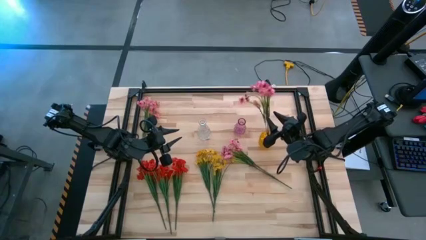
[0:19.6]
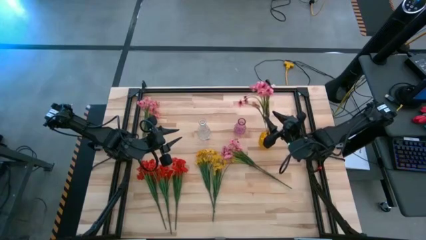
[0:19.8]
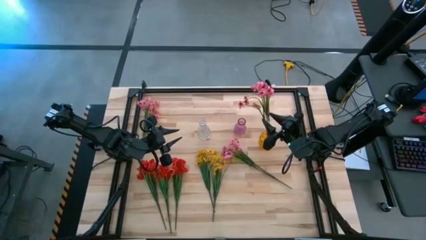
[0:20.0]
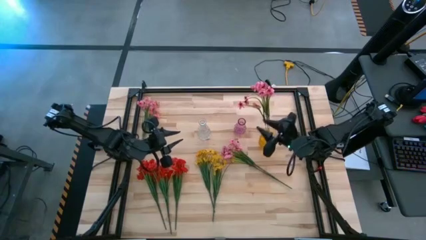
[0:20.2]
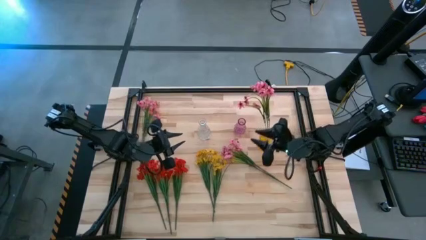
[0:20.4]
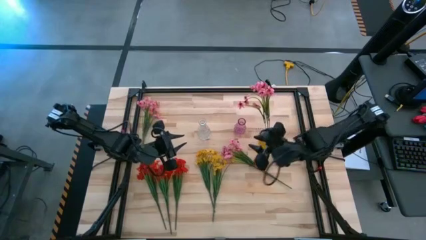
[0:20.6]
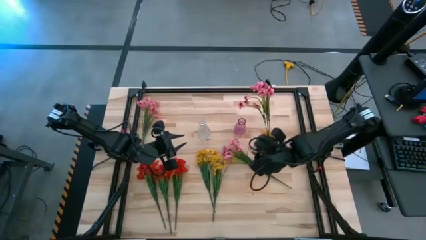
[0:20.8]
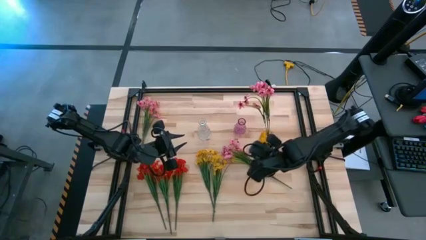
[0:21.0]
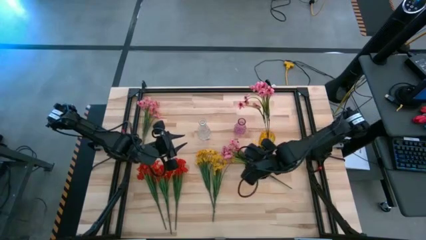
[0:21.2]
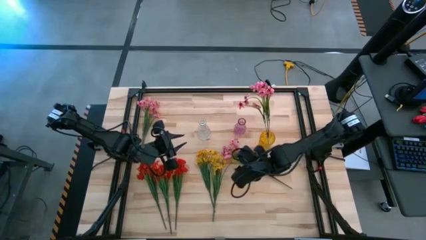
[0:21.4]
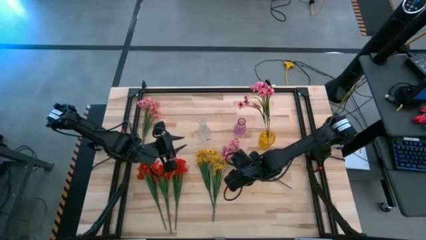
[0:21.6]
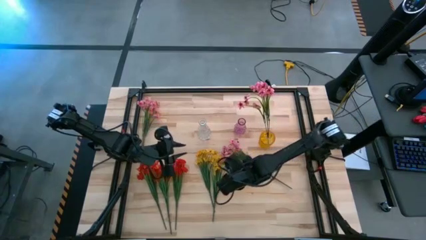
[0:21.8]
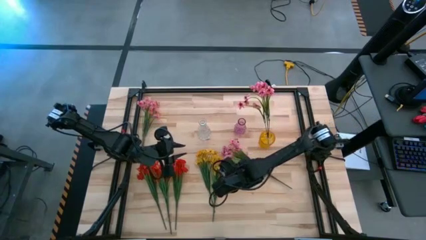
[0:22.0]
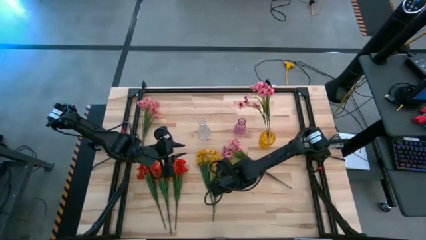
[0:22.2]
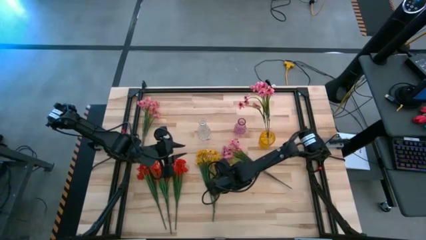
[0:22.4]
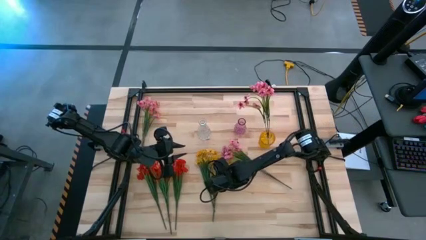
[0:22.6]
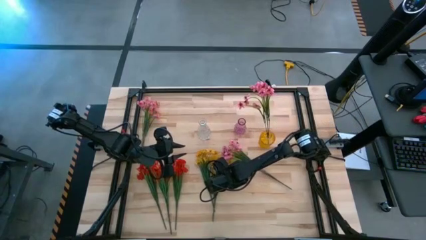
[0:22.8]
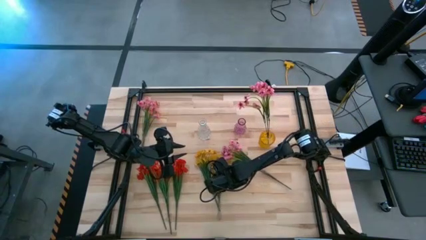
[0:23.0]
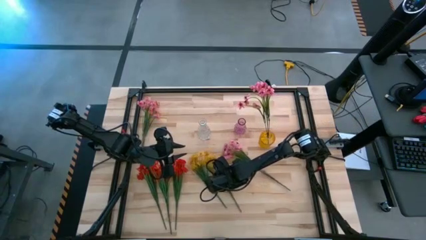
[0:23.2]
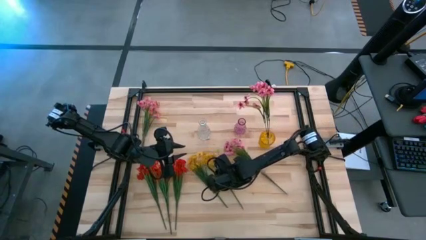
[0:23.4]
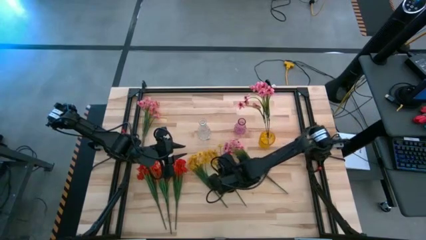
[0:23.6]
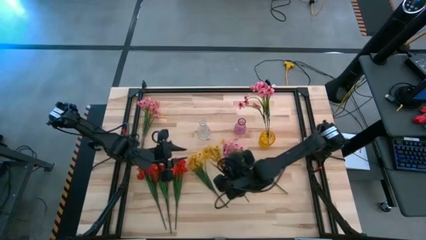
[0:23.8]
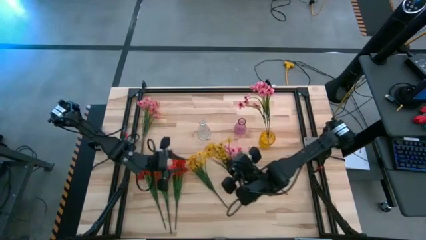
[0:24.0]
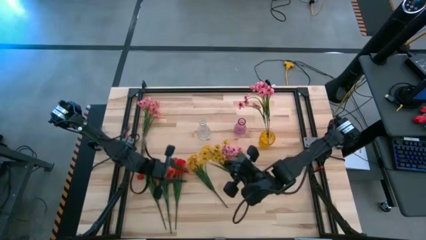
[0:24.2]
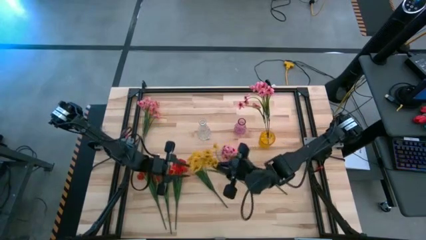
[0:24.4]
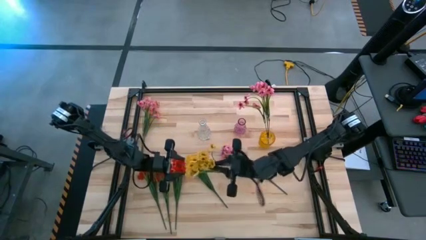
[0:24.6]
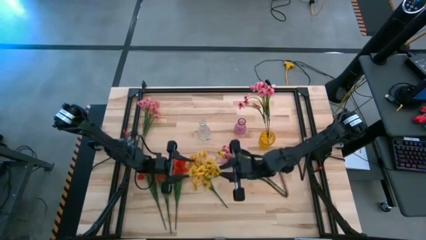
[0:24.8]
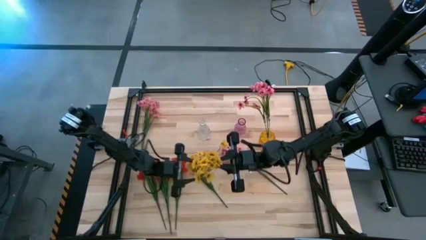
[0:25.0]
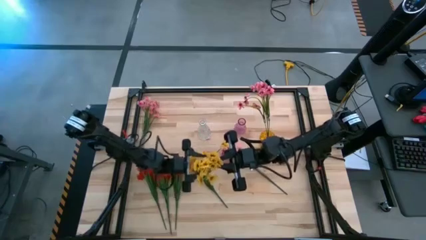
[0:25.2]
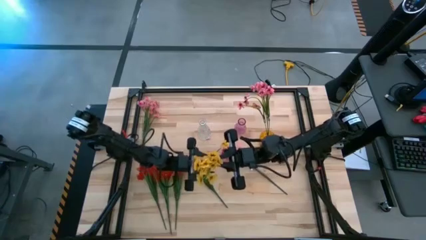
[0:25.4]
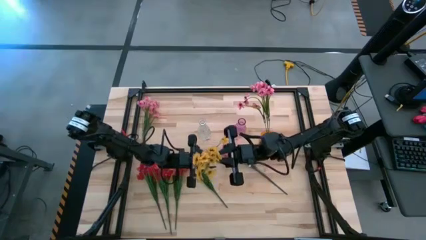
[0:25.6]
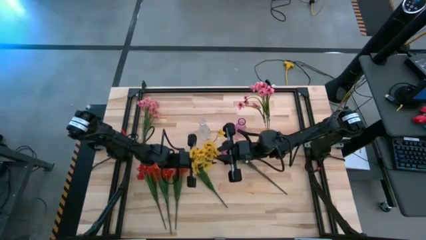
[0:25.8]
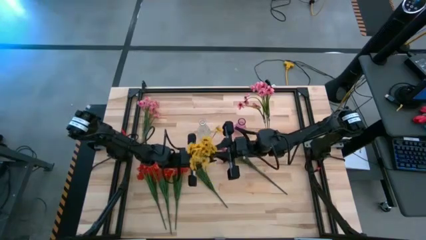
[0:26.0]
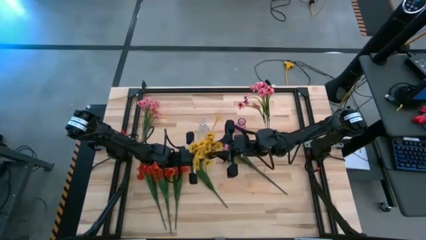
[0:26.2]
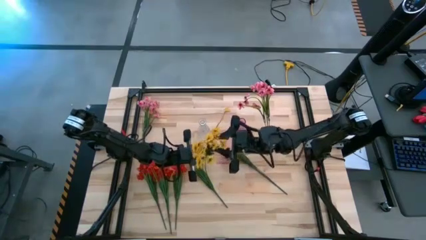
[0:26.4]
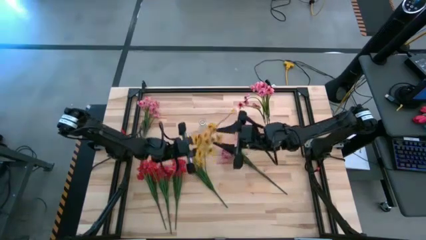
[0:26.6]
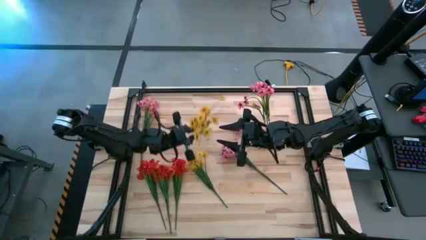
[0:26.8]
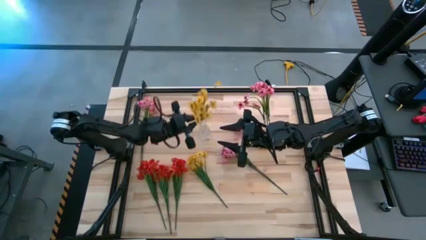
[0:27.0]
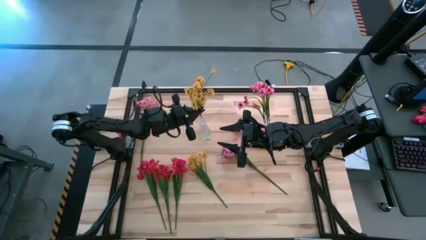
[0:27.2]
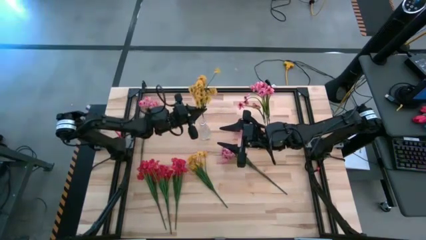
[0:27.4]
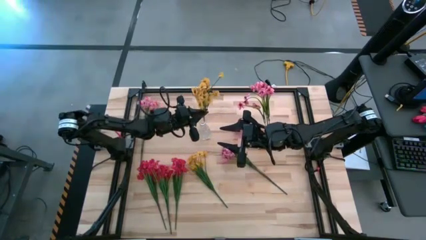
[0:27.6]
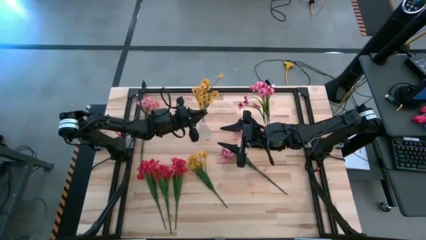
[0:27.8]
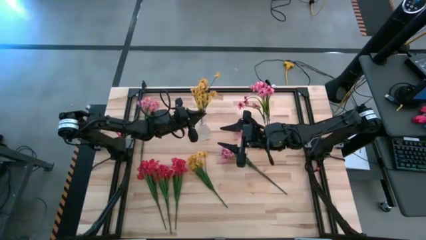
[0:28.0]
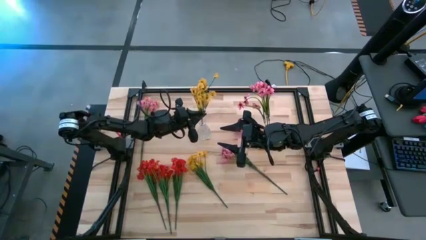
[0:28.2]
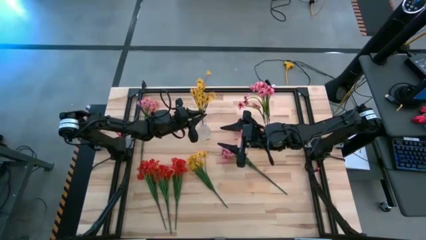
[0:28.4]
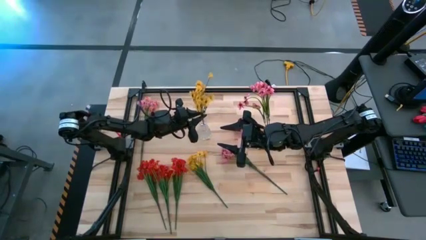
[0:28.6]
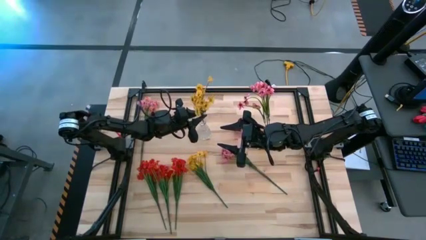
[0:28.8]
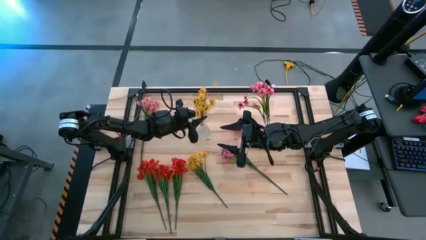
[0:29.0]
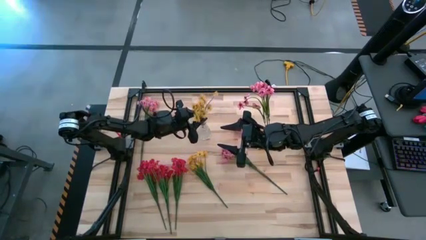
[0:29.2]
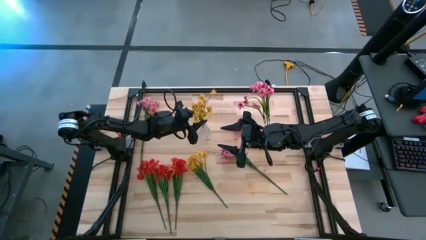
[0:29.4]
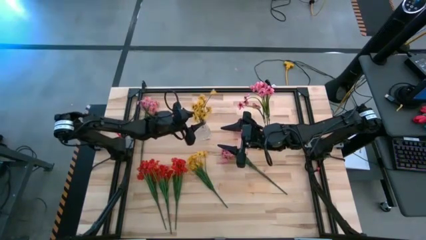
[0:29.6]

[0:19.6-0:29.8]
Task: Sort flowers into vase by color
Put the right yellow flowers into the transparent vase

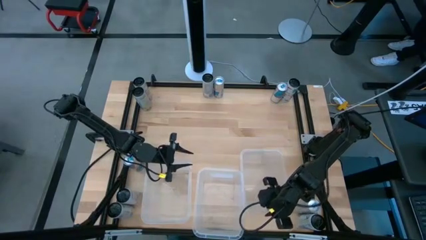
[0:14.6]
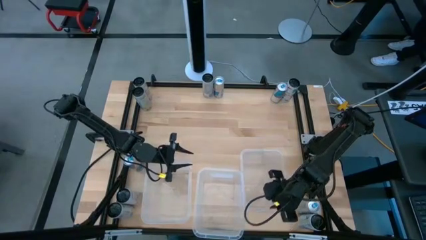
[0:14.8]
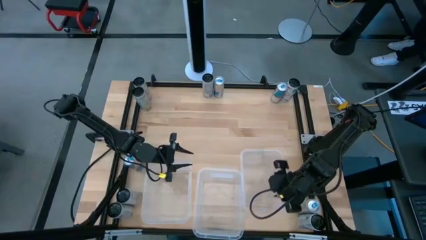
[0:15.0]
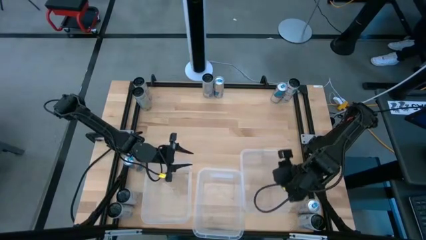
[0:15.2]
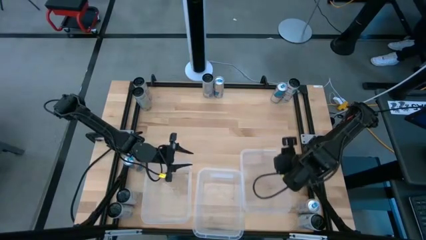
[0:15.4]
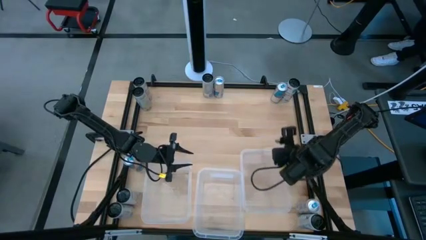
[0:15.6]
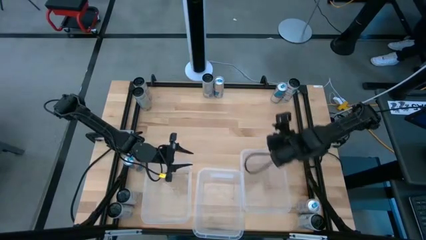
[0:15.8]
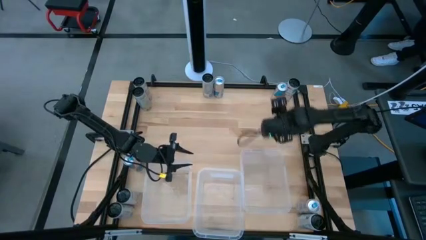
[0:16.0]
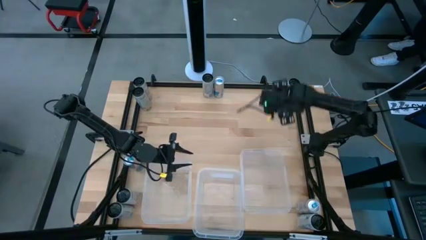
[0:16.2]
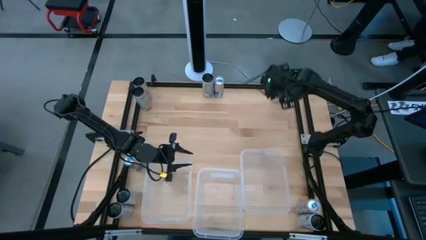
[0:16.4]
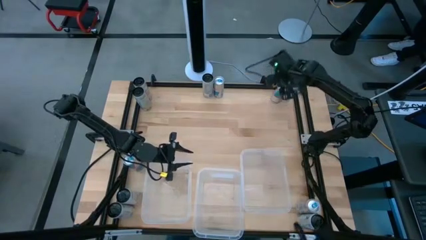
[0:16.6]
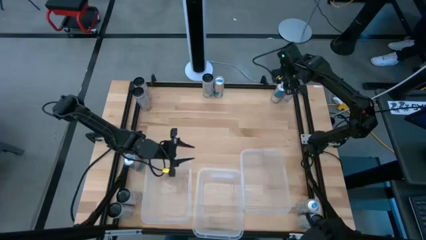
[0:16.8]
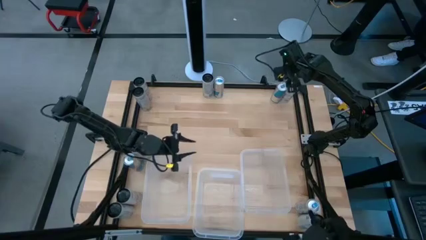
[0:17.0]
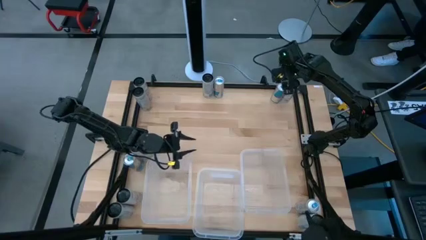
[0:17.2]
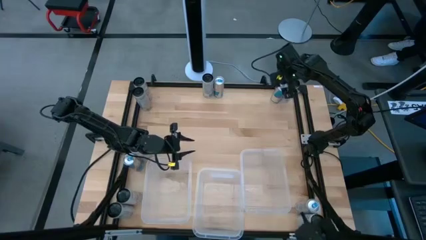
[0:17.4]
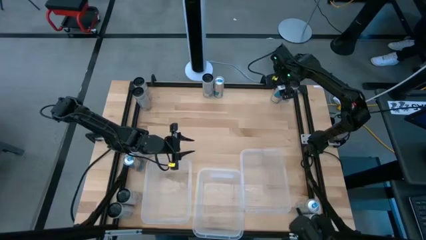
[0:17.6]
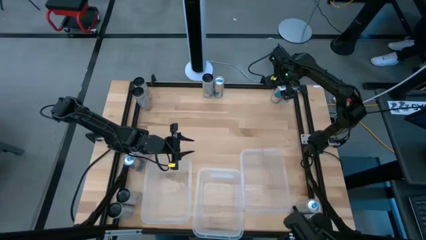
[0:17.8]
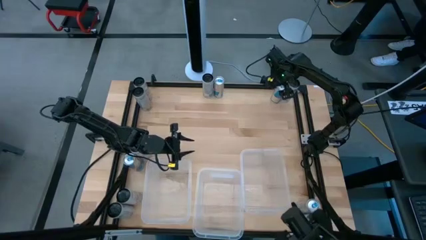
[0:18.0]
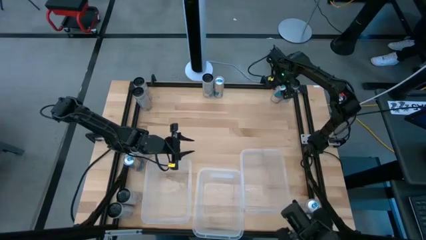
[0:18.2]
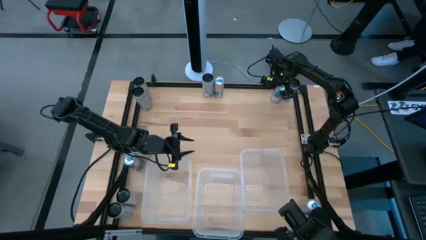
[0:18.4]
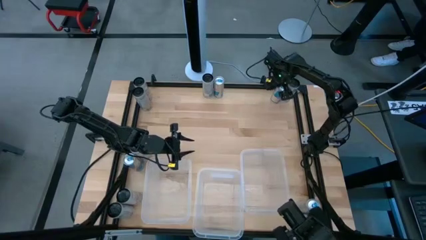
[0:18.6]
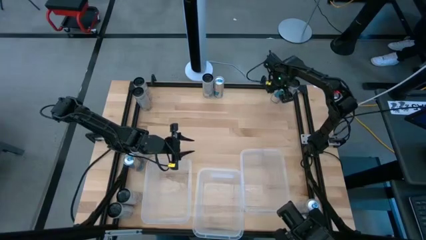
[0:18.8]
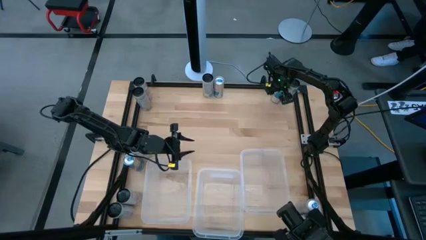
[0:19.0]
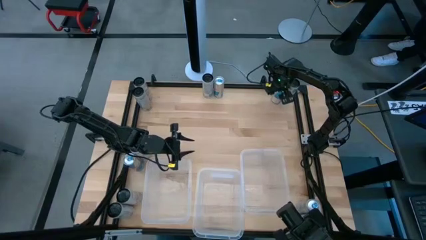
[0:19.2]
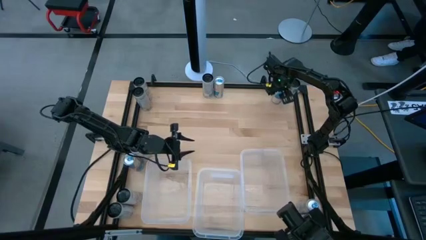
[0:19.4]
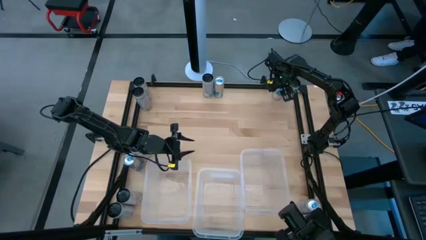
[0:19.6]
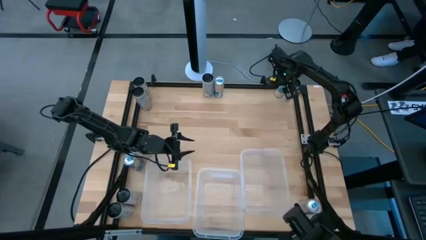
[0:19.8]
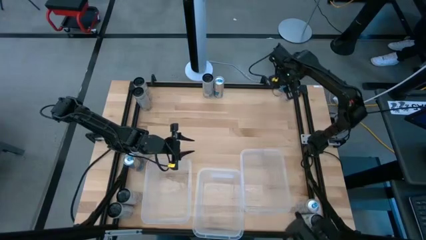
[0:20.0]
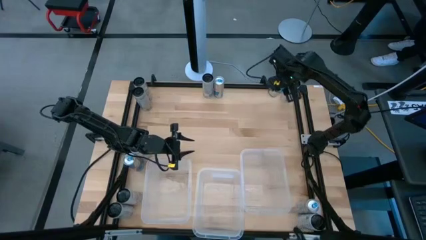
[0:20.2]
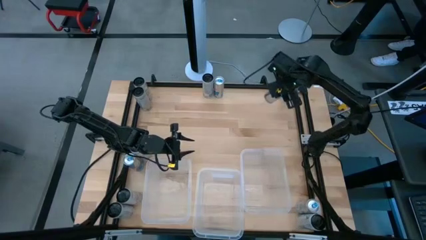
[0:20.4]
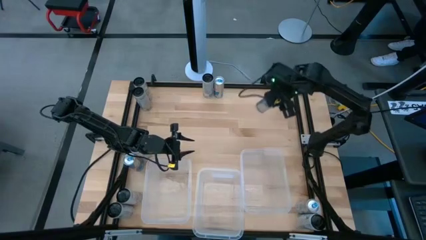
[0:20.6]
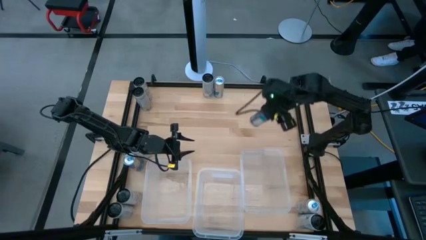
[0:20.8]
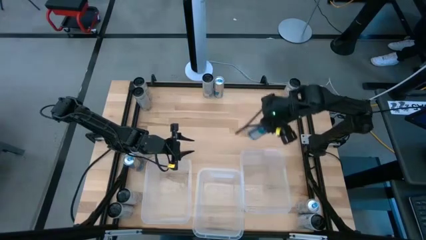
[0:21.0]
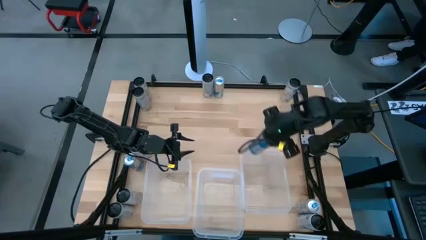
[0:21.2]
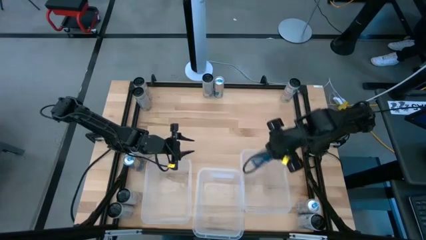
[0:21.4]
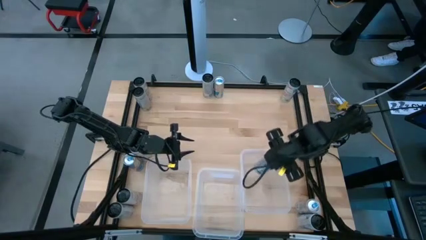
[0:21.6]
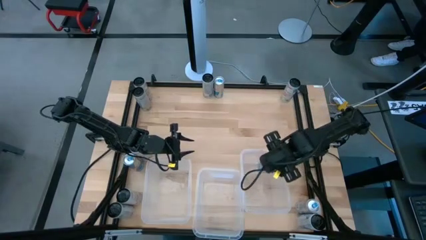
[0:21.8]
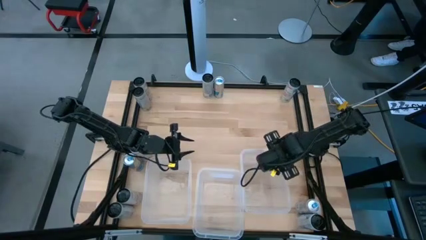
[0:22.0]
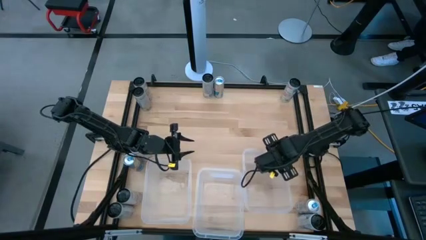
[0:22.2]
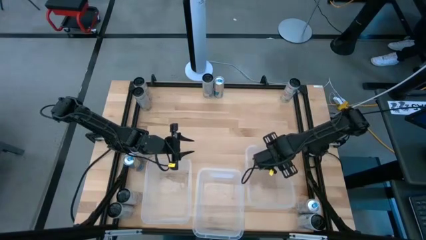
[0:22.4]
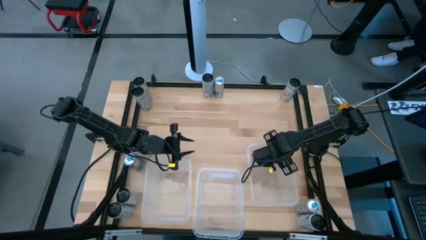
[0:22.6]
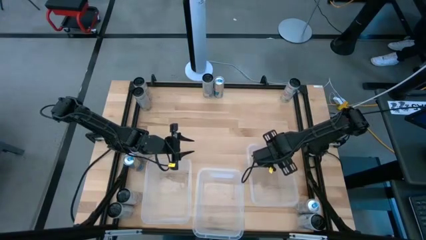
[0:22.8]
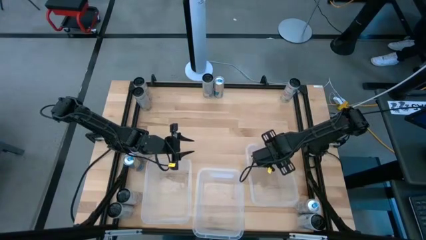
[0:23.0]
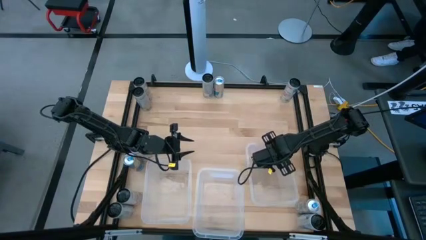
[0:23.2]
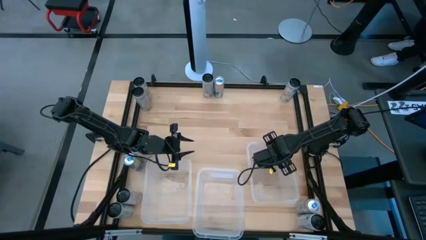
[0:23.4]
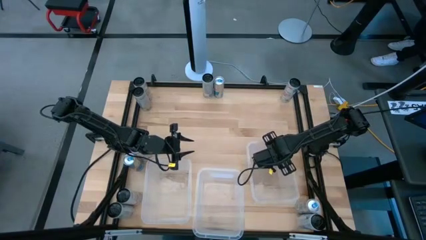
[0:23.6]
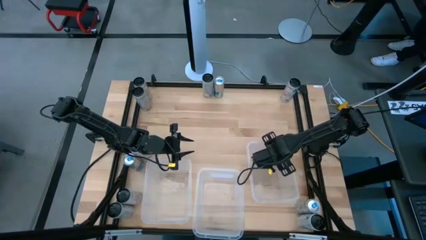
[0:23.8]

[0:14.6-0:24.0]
Task: Sort soda cans
Put the top right blue soda can into the right transparent bin
